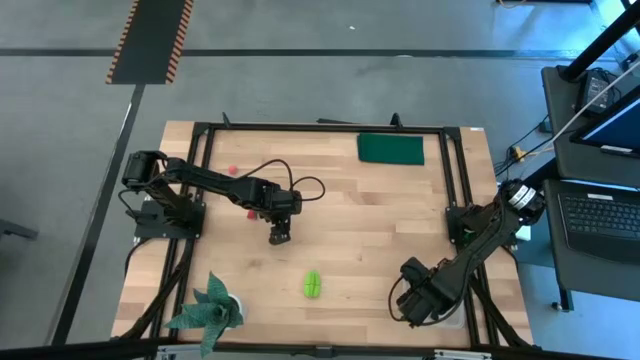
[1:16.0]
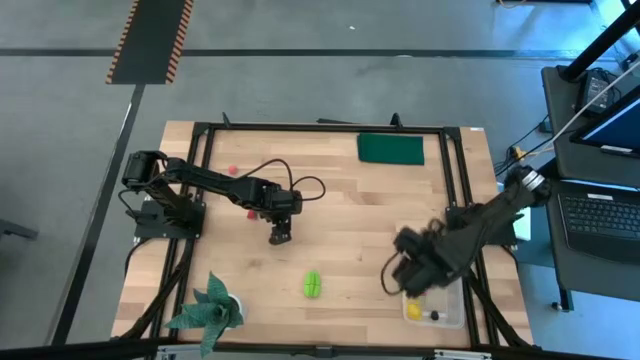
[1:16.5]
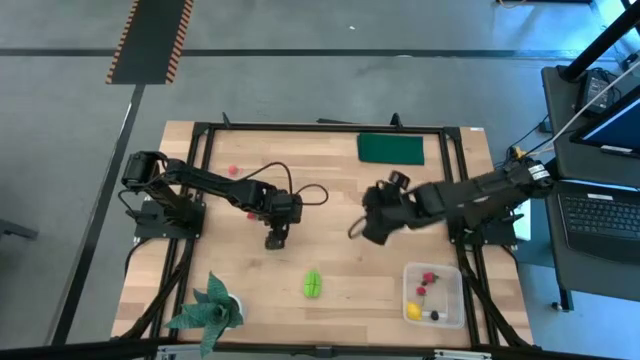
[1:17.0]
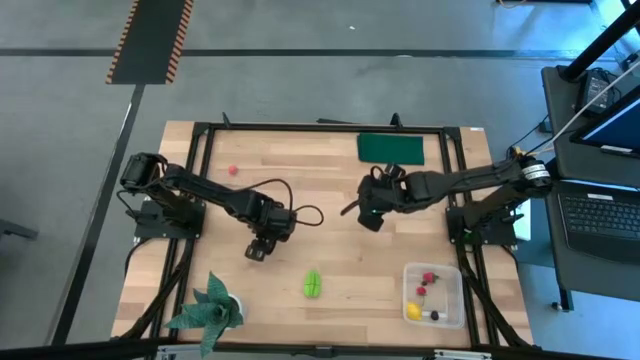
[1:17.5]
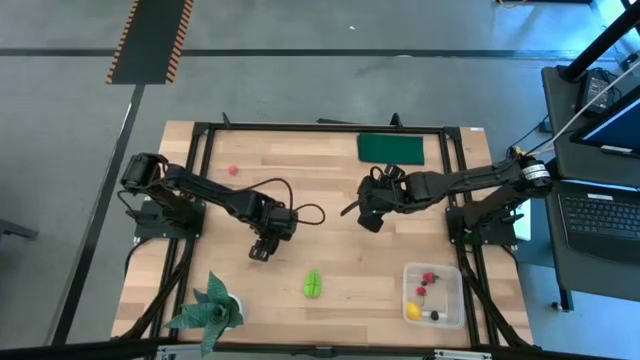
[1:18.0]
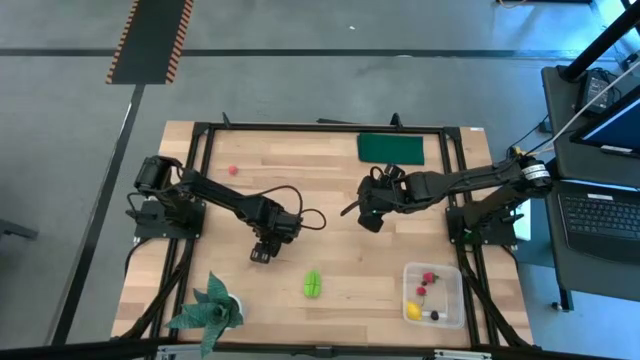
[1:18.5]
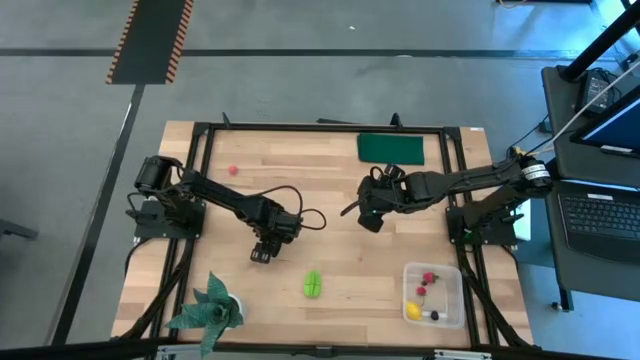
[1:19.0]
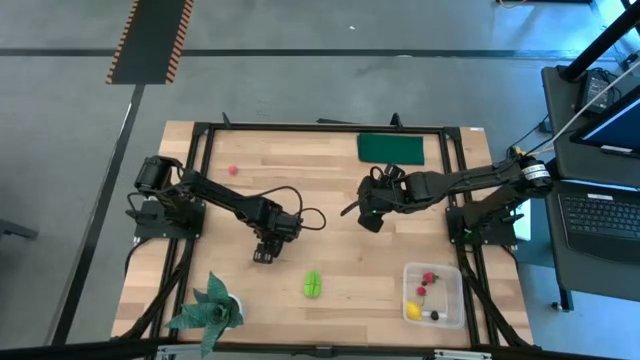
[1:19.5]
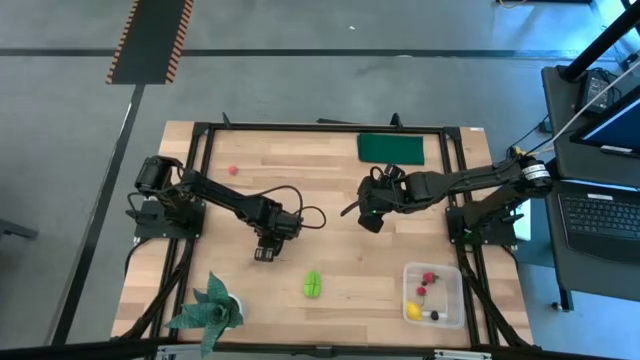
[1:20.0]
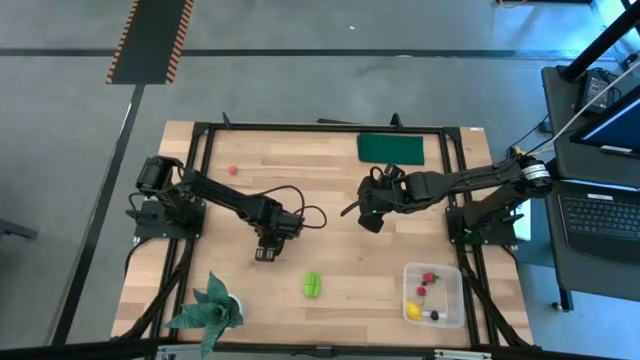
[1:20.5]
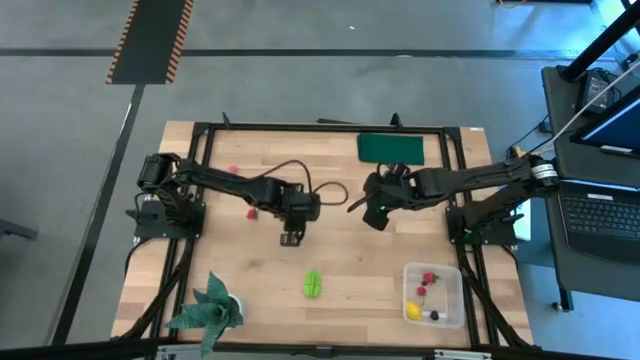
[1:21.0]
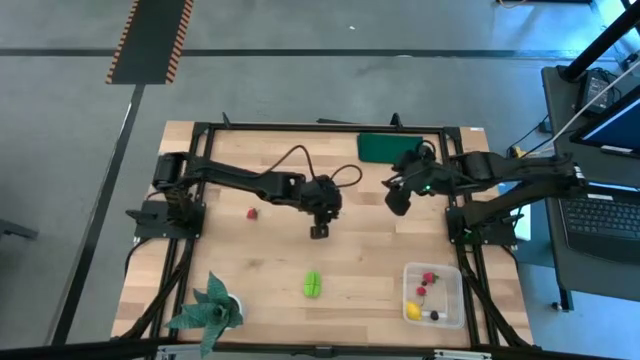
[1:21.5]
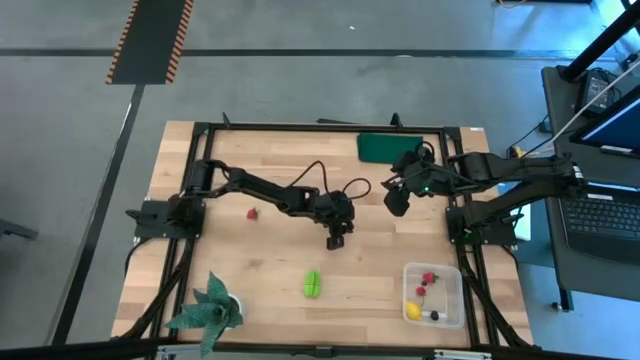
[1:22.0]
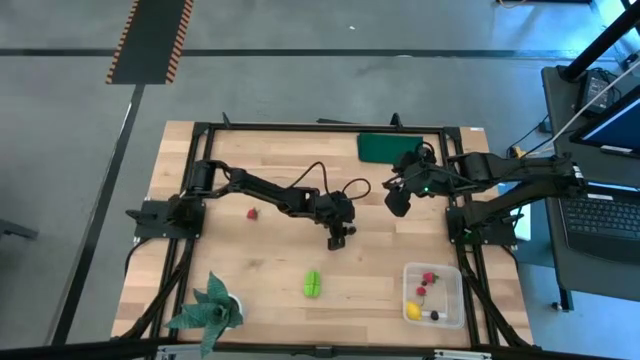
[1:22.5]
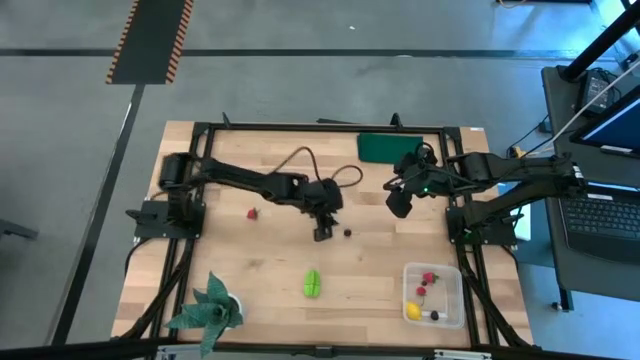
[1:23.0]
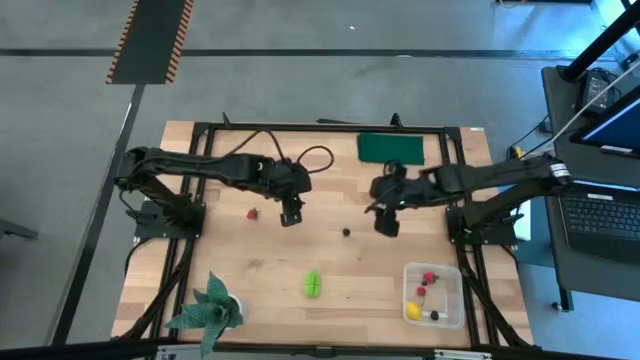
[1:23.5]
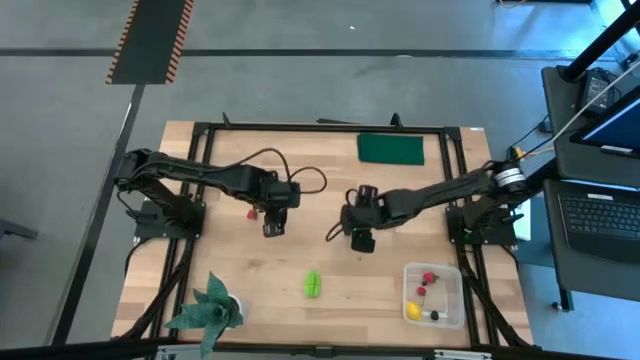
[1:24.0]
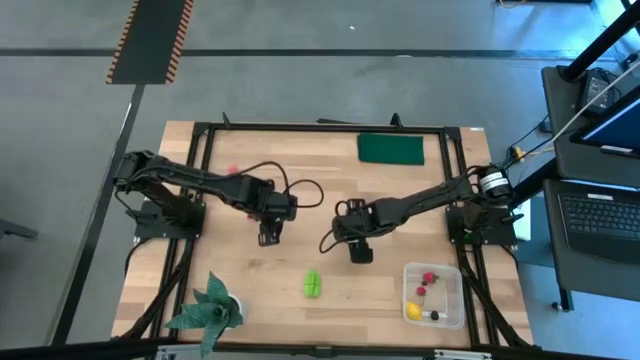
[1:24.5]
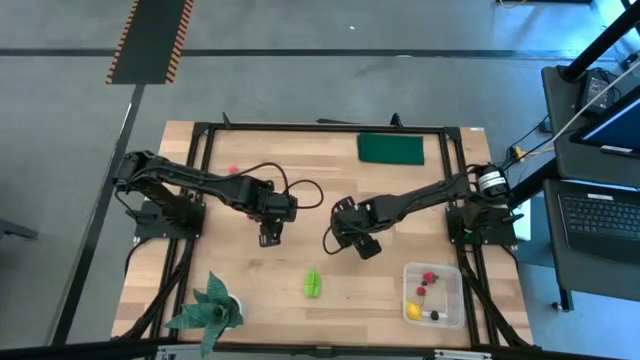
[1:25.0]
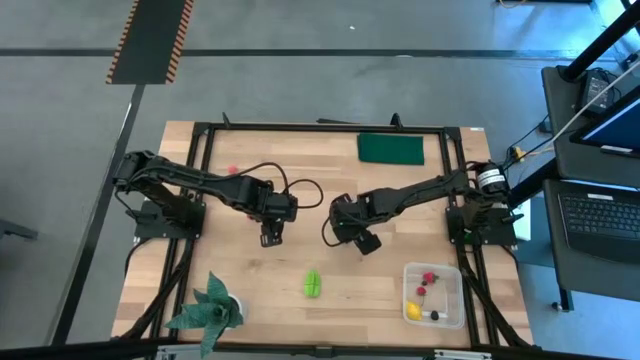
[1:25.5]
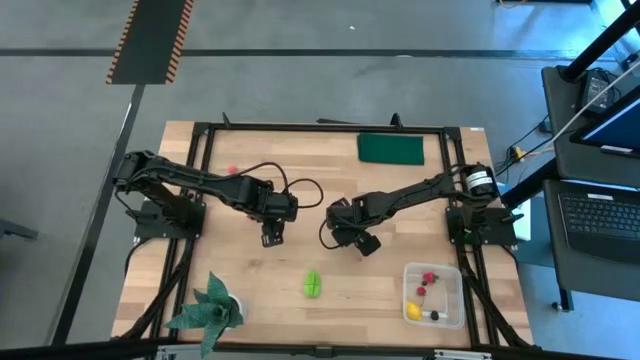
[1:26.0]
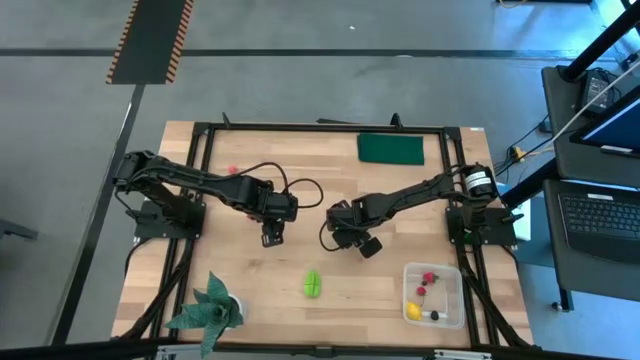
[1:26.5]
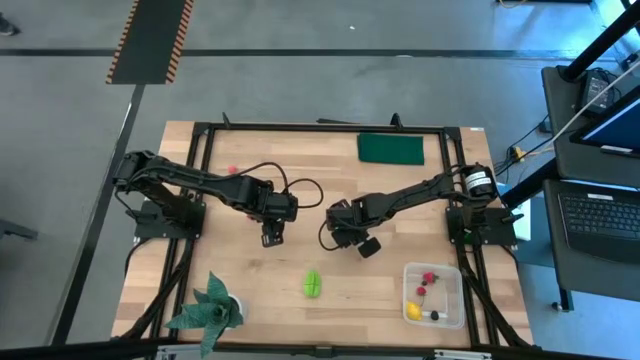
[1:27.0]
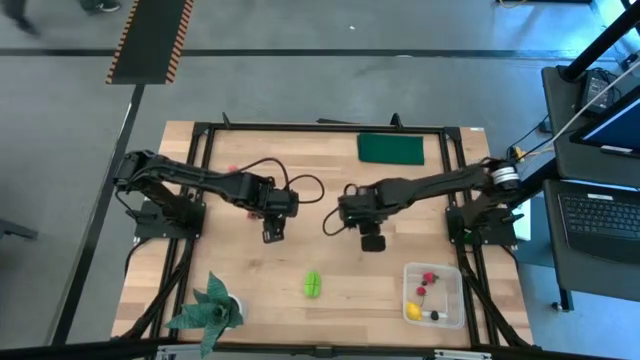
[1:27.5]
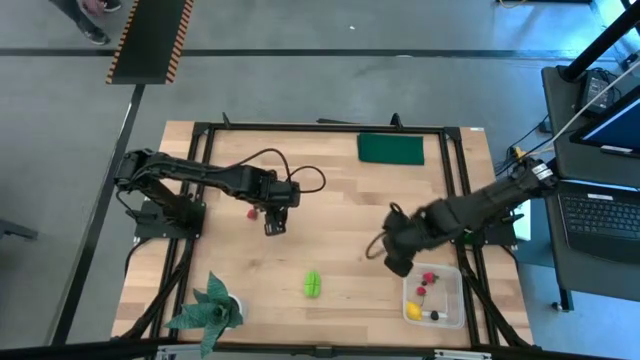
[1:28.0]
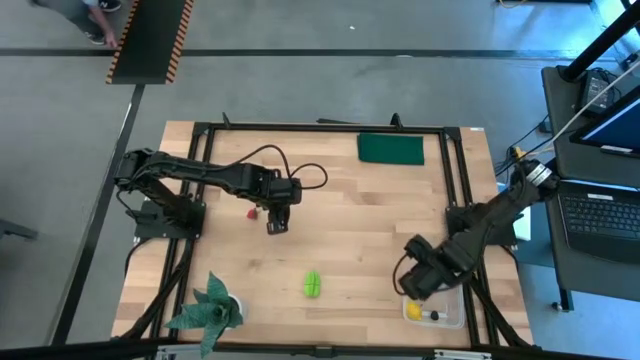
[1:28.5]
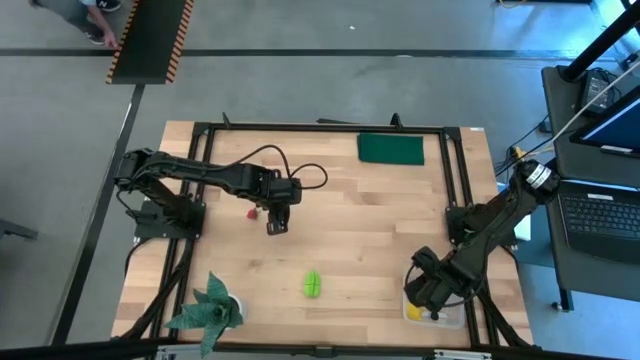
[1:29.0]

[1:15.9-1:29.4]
Task: Pick and placing Produce into tupperware
Put the black cherry into the transparent bin

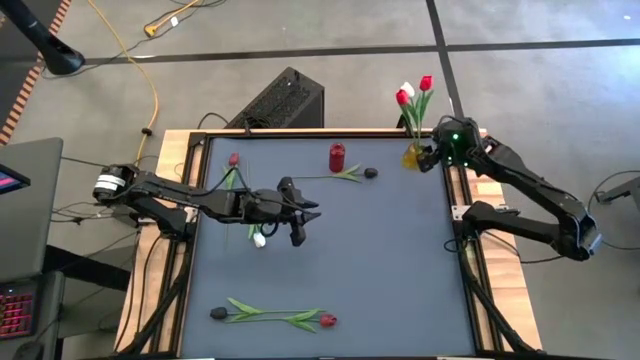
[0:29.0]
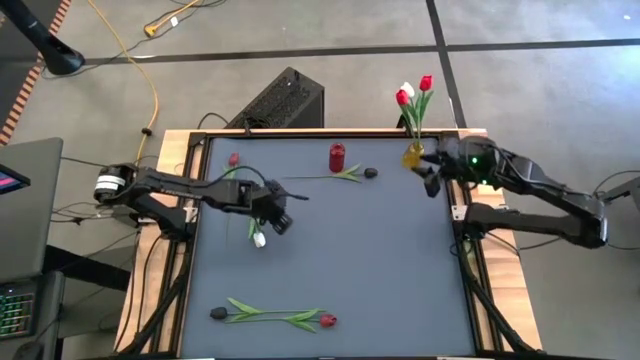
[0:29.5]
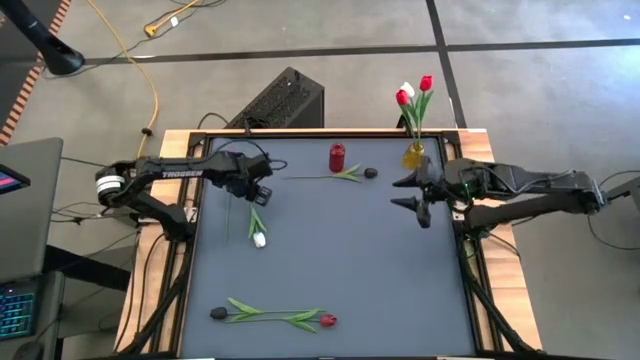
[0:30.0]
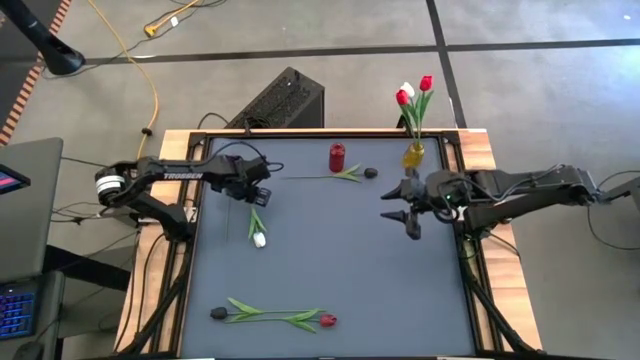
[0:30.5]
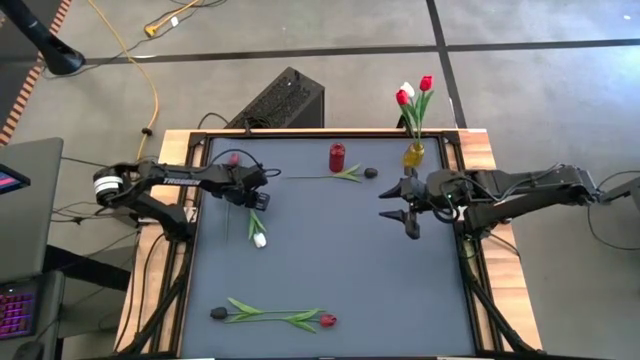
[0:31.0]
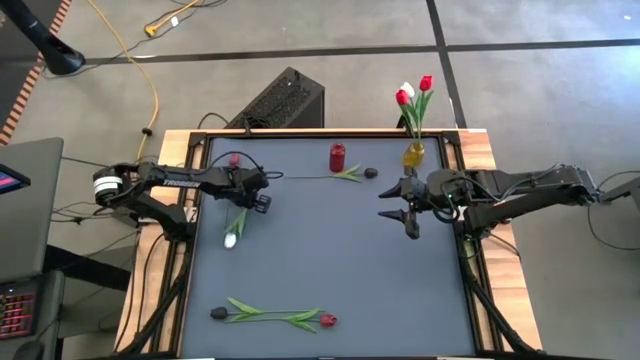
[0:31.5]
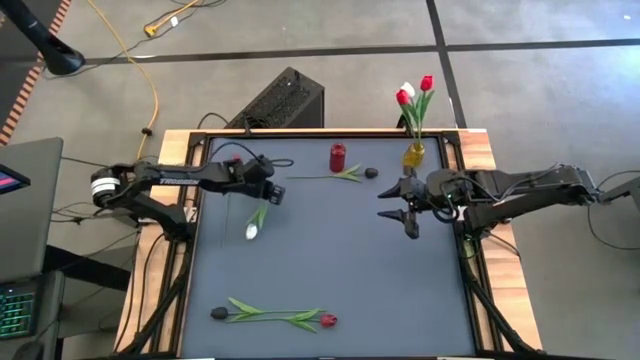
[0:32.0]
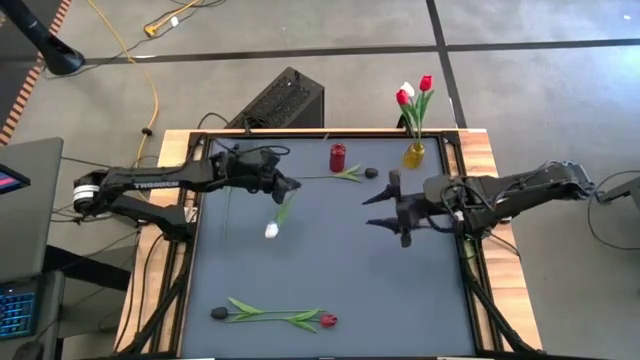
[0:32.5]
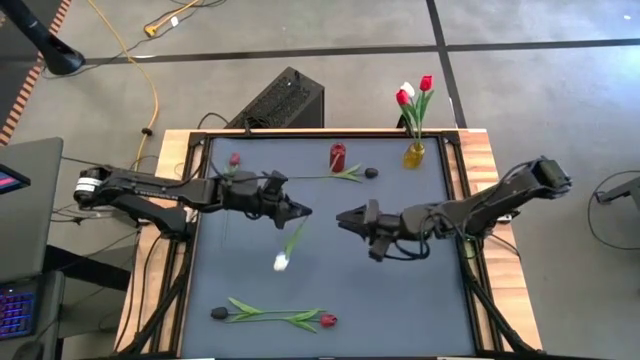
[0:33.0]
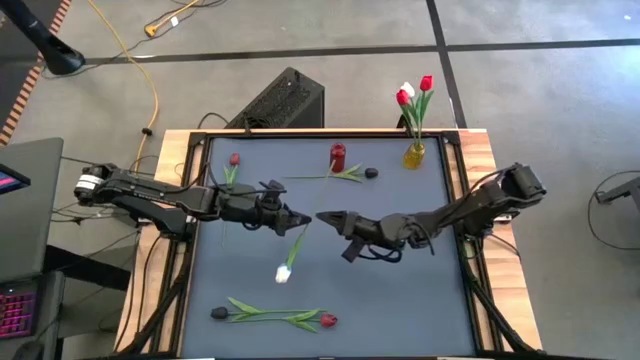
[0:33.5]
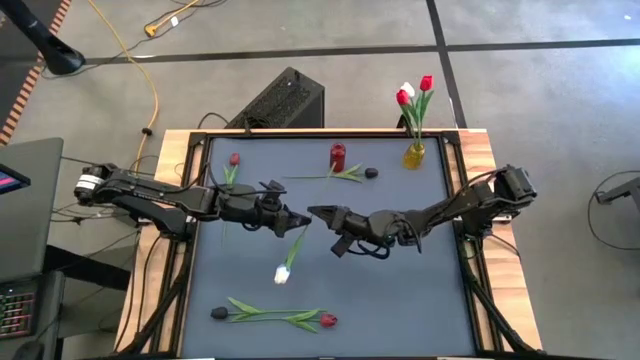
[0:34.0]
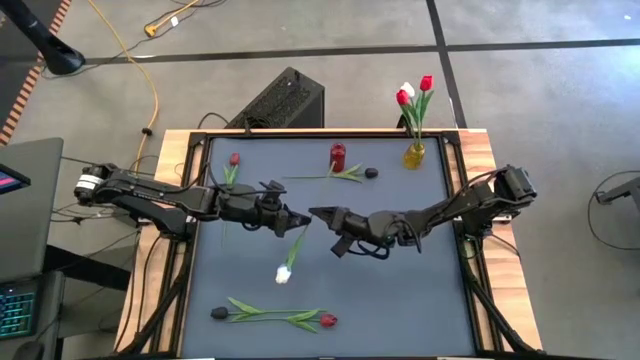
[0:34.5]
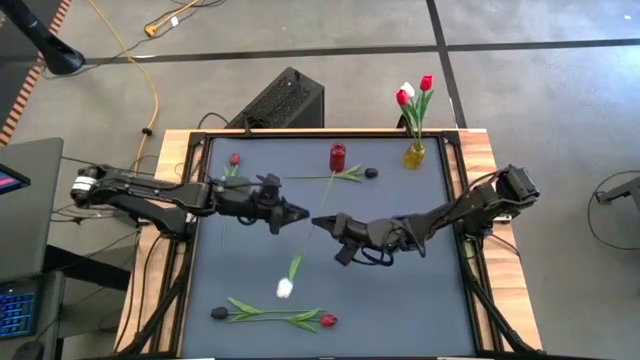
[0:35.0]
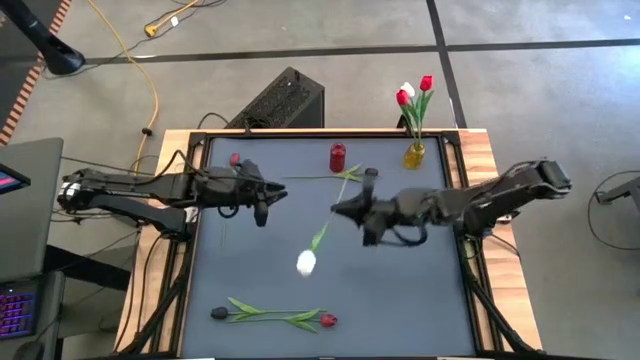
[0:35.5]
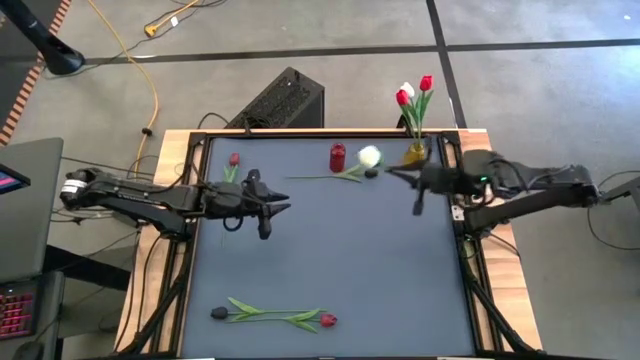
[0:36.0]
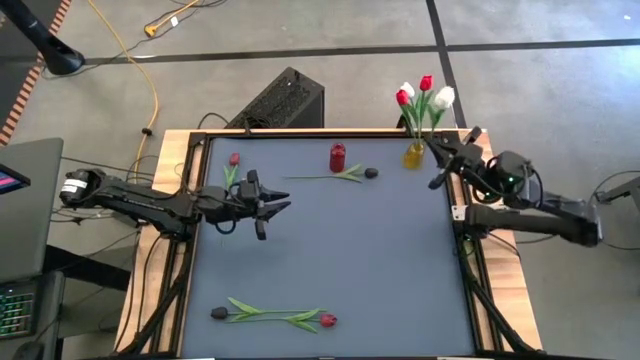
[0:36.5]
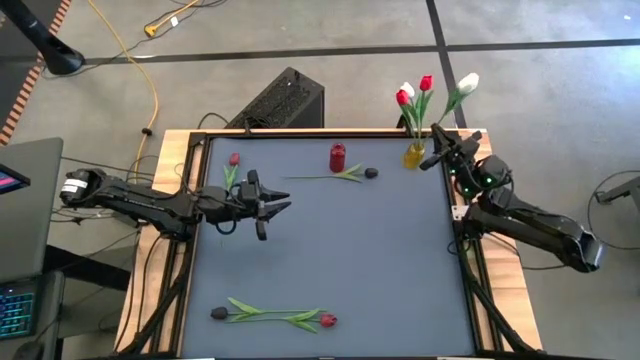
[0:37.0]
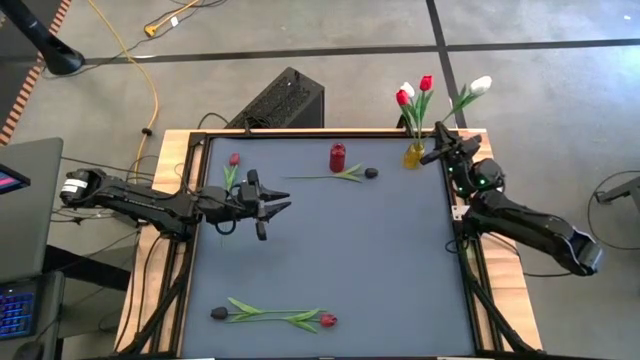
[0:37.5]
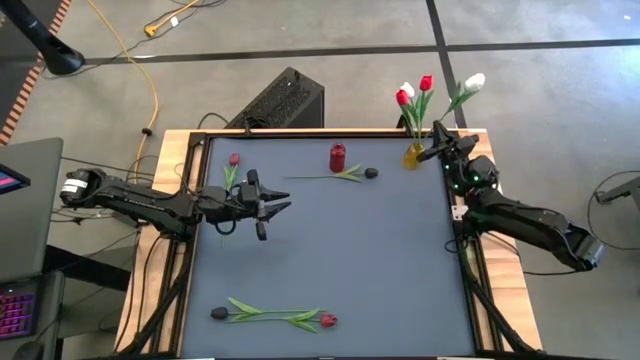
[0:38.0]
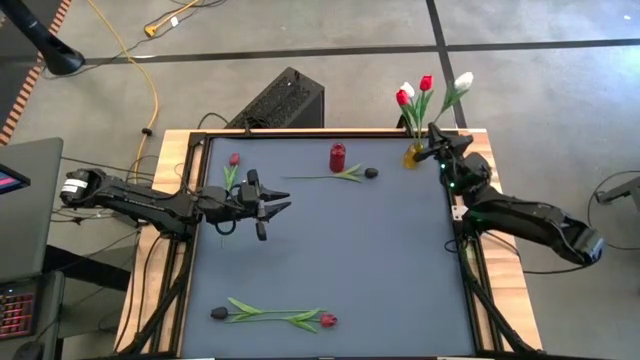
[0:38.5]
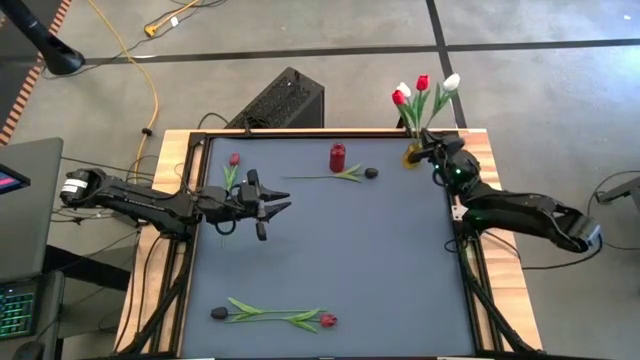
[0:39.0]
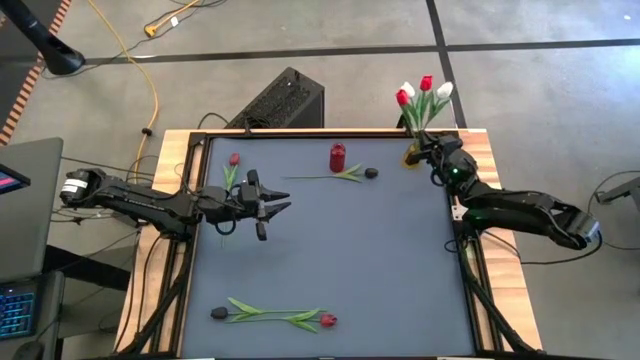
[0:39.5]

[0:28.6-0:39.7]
Task: Sort flowers into vase by color
Put the white tulip into the yellow vase
